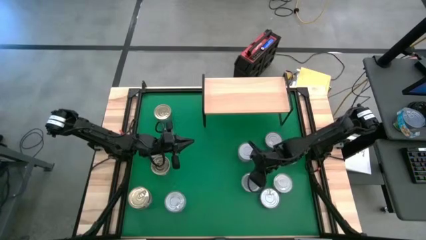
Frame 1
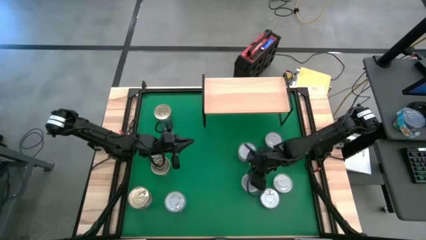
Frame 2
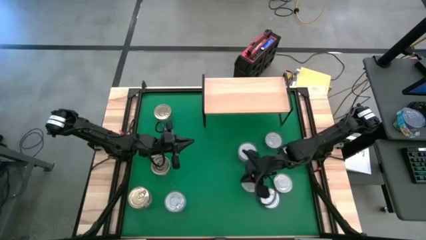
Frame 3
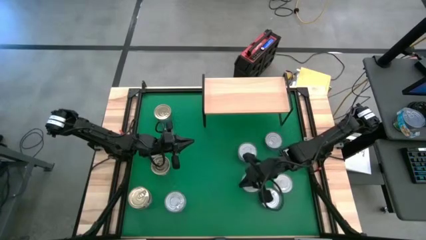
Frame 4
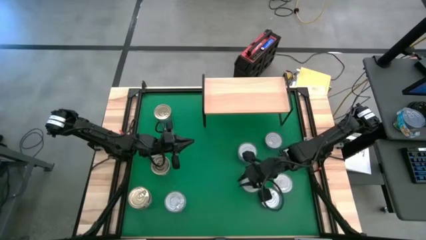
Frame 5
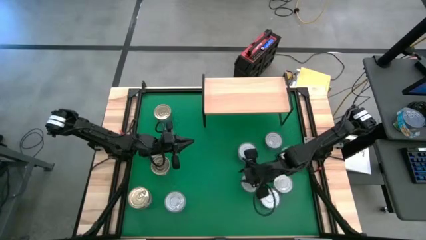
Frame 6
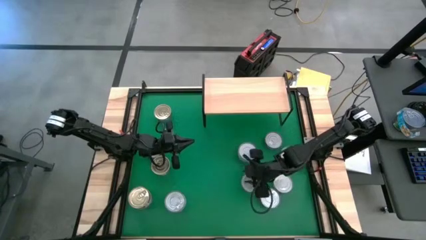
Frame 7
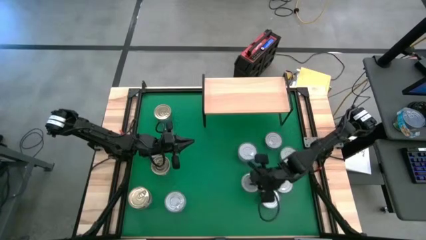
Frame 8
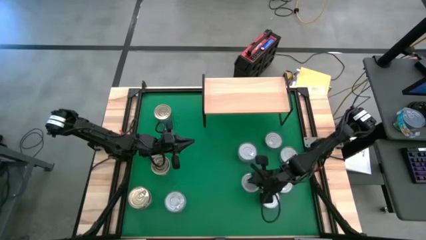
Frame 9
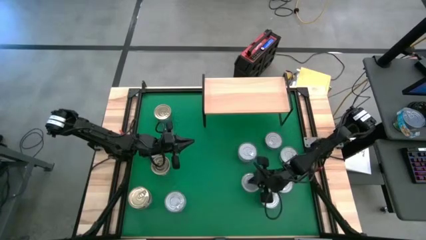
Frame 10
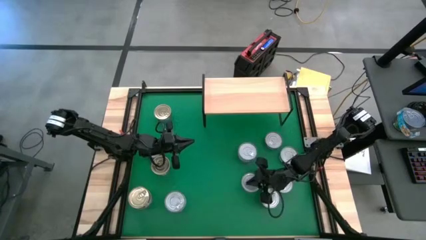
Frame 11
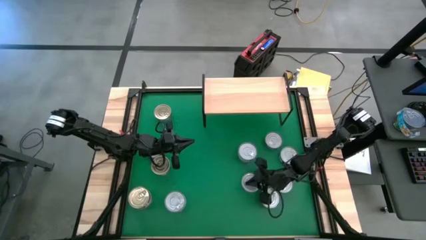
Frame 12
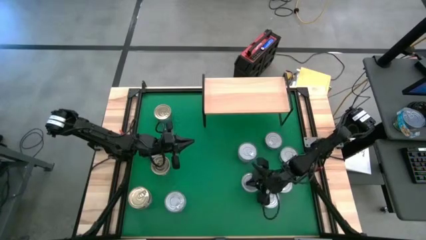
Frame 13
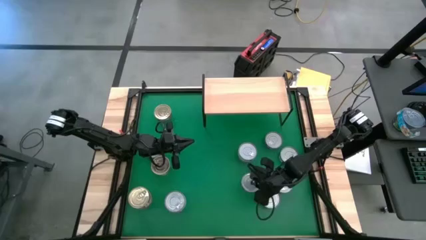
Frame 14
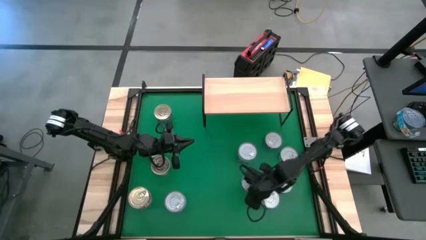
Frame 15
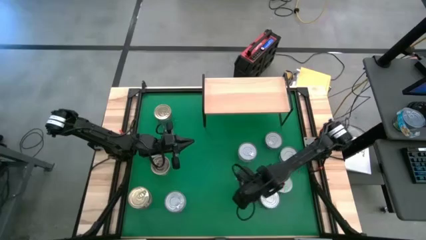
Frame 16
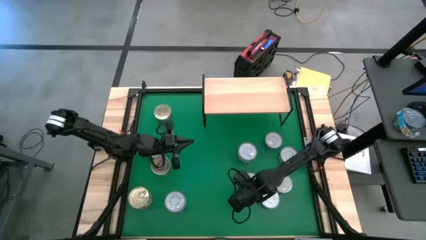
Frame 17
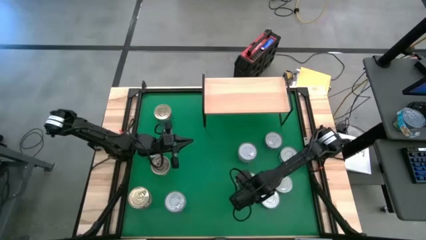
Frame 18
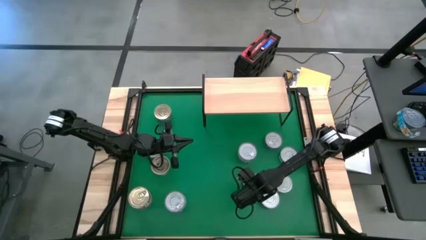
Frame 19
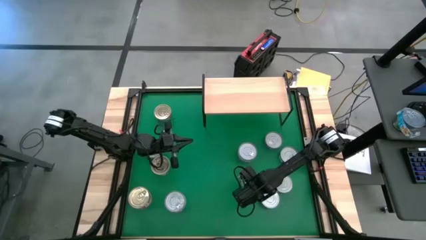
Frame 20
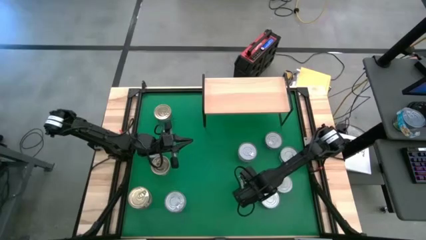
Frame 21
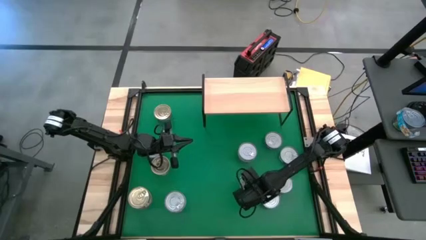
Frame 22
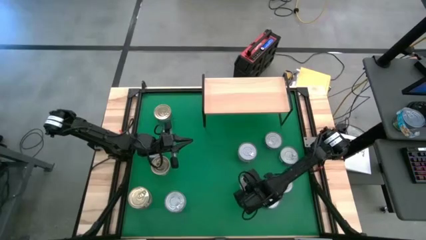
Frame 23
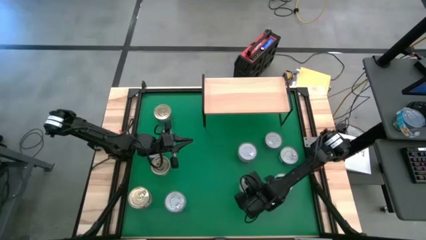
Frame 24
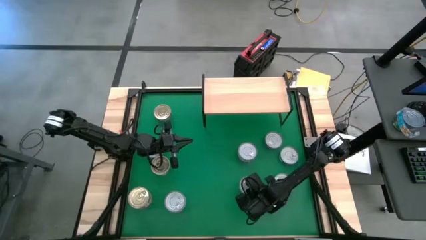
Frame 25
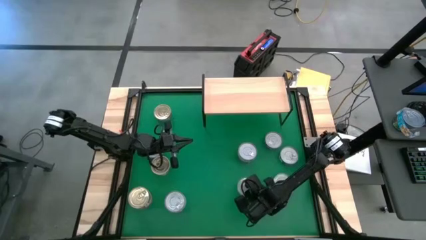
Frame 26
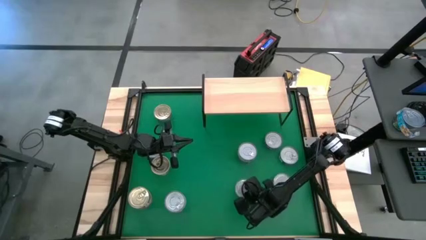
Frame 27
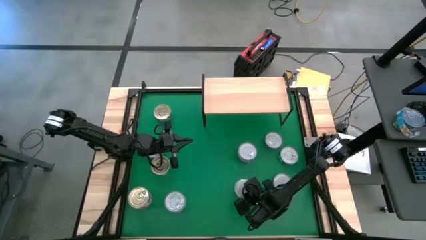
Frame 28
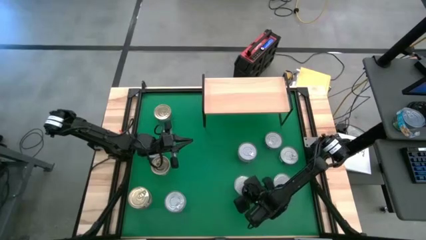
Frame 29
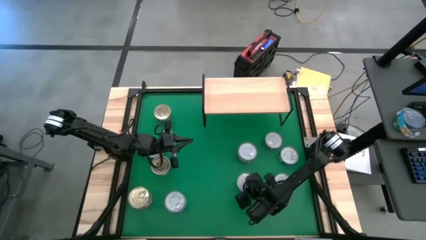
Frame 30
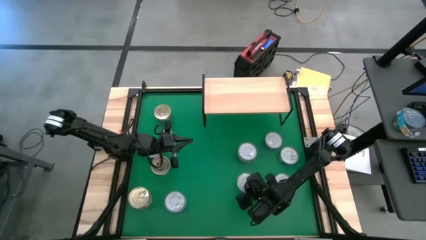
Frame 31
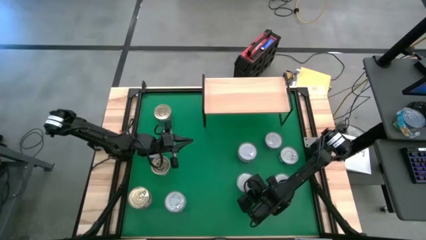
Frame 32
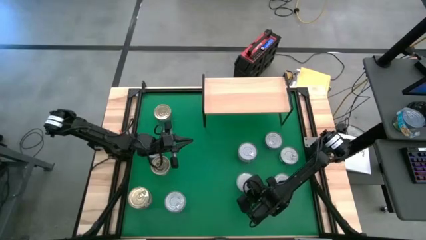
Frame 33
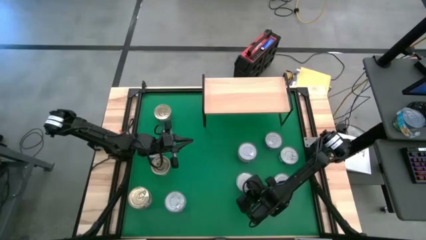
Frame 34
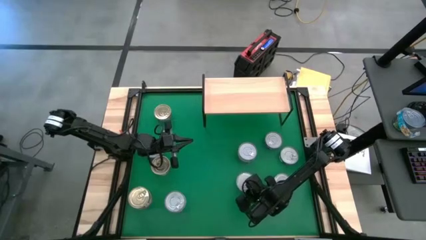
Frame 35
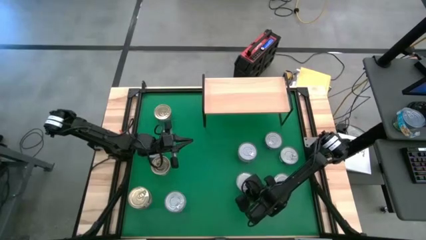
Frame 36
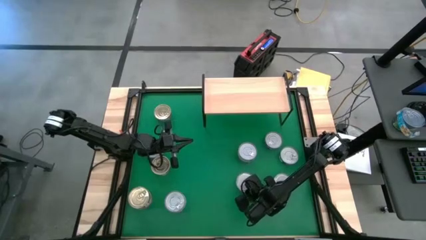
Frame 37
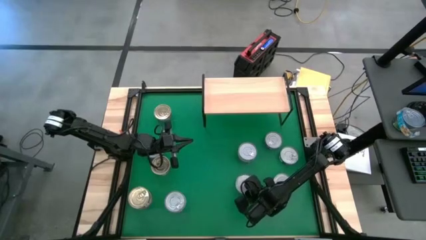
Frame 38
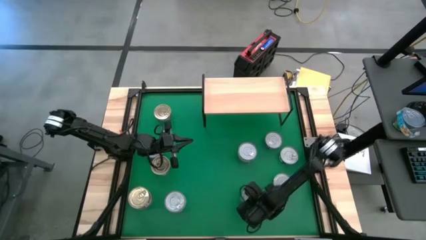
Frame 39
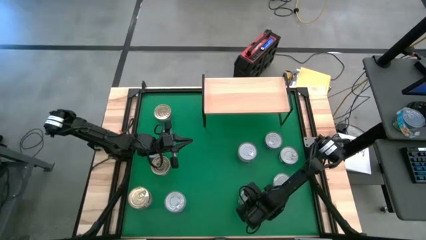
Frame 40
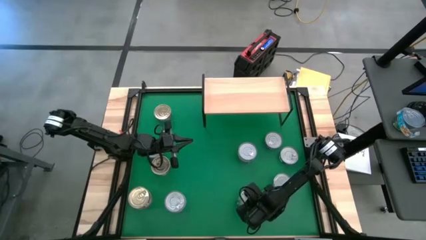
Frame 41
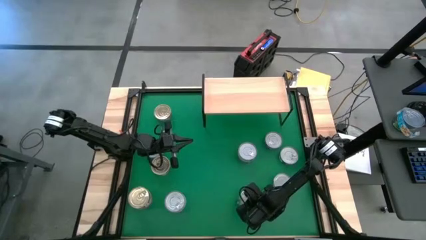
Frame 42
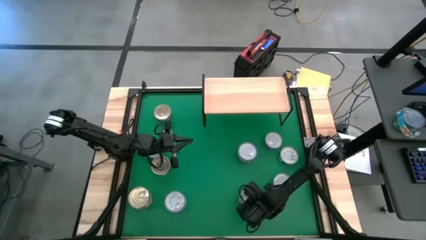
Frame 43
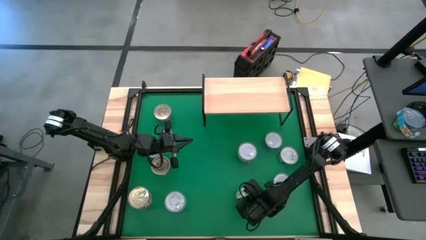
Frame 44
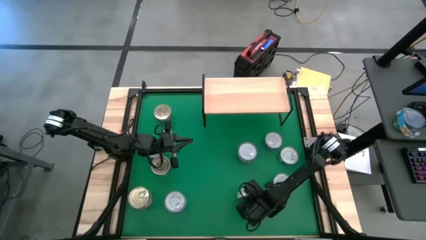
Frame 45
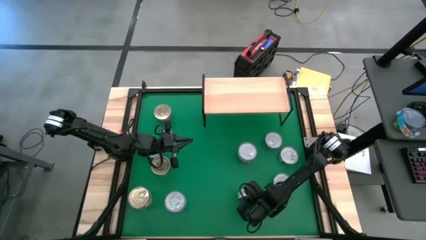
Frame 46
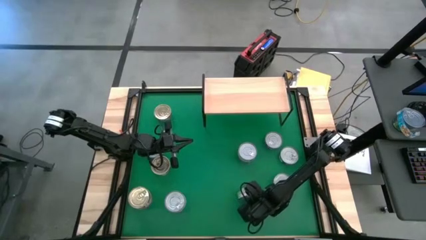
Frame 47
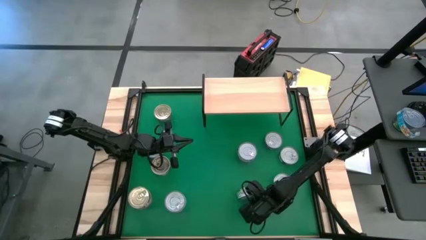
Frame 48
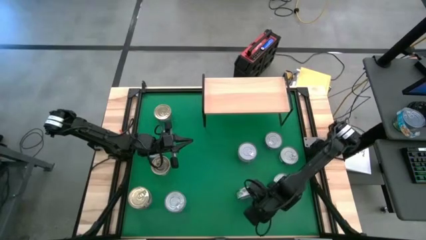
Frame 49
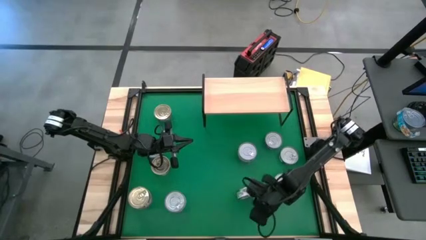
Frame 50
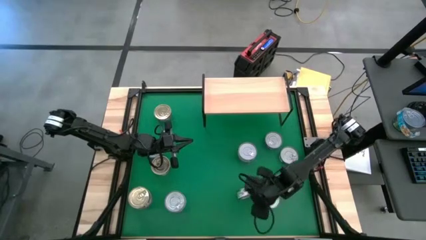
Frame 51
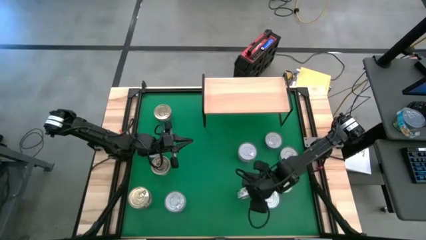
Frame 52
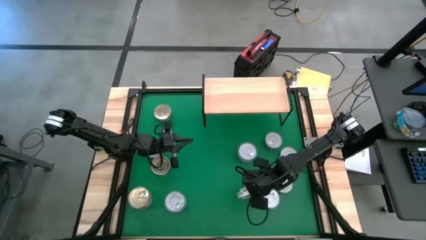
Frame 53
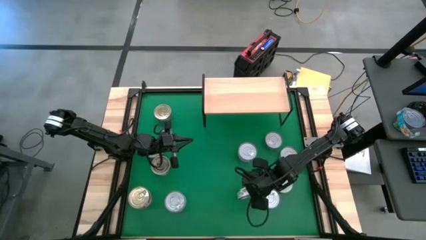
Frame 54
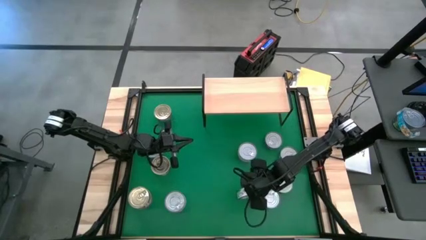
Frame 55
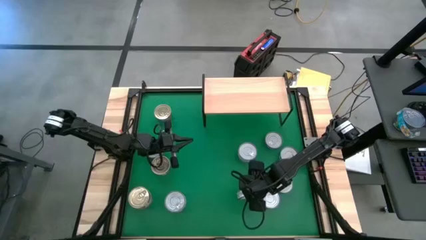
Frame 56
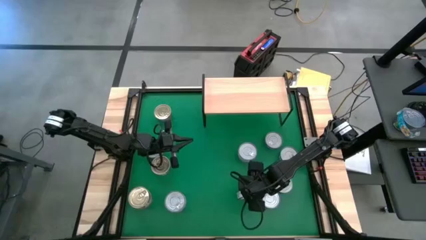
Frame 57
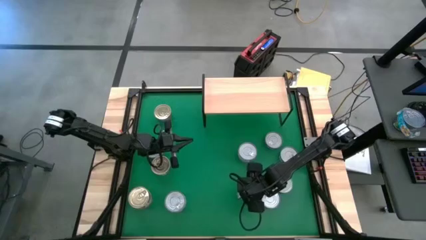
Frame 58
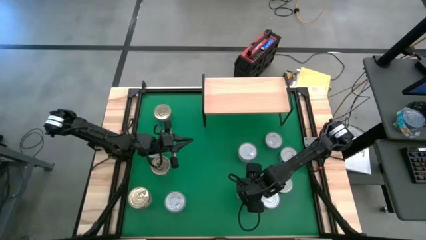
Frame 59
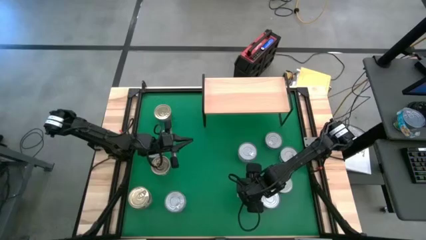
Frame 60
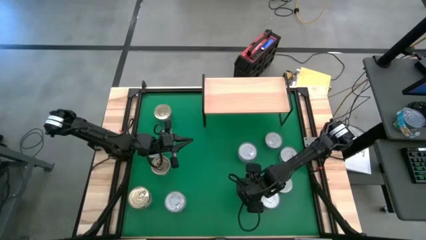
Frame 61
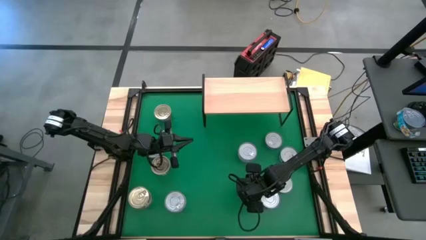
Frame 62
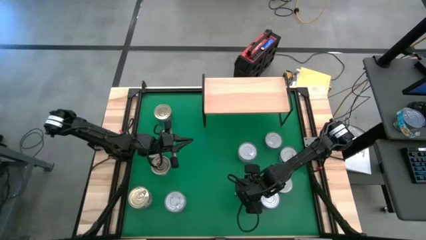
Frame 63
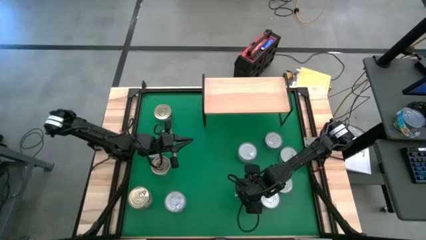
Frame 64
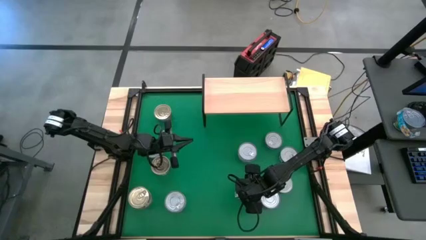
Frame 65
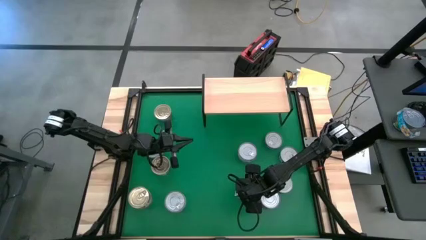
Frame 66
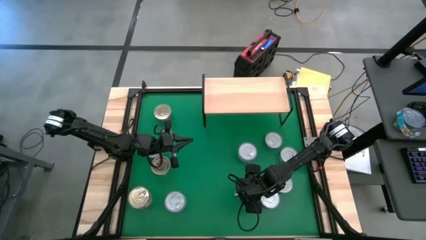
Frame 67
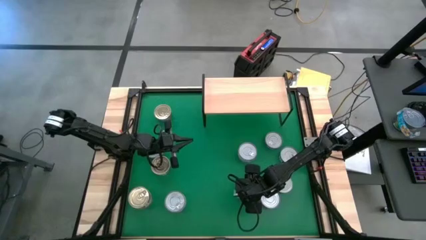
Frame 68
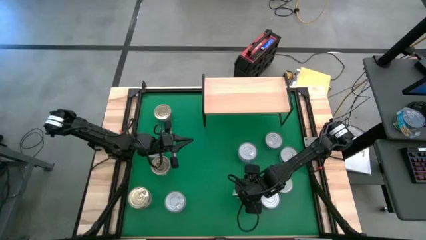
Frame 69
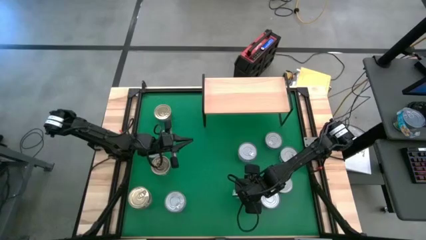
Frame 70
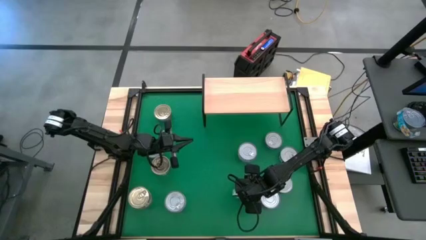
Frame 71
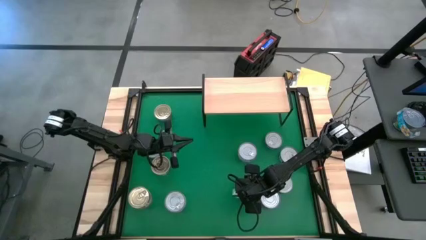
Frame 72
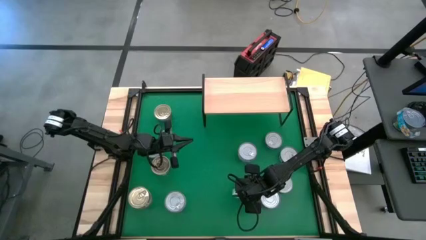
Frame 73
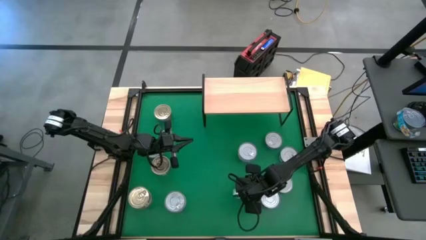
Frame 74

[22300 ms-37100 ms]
Task: Stack canned seafood by type on shelf
Put the green tuna can on the shelf
